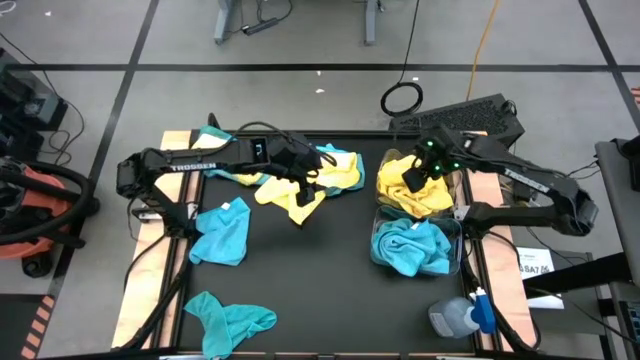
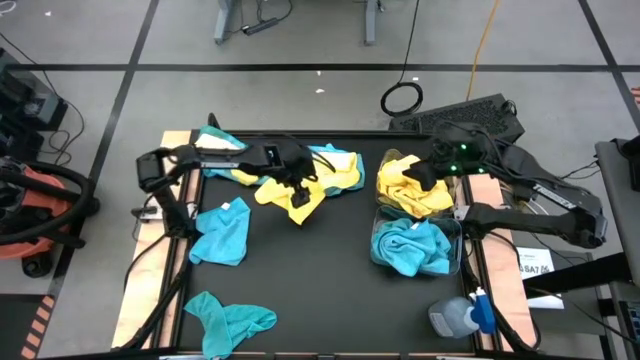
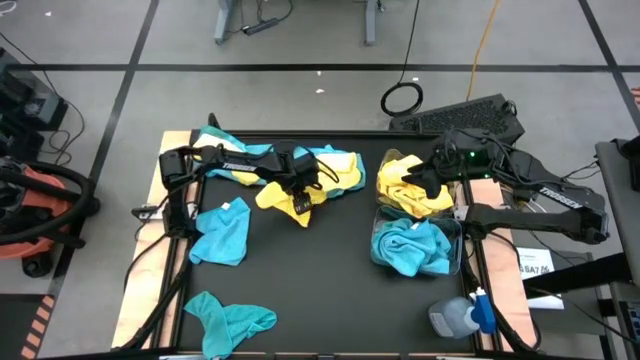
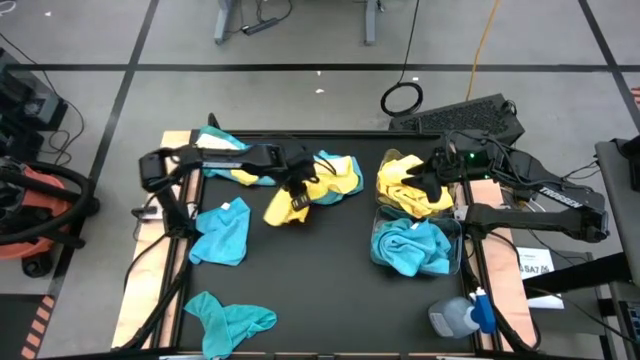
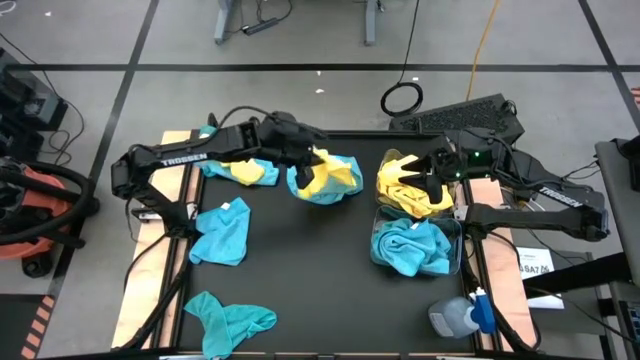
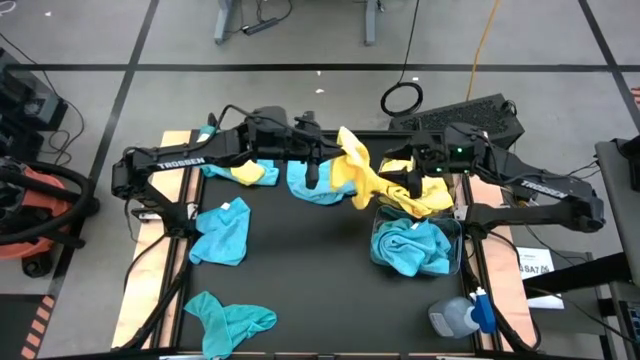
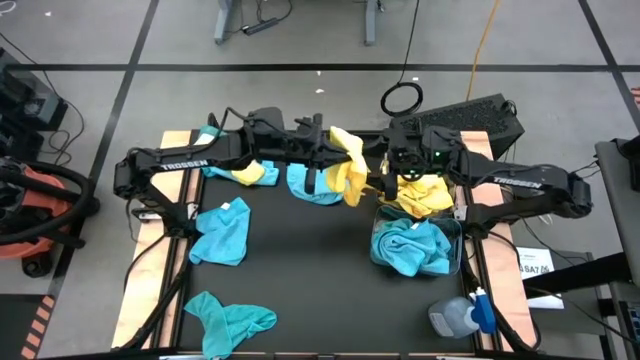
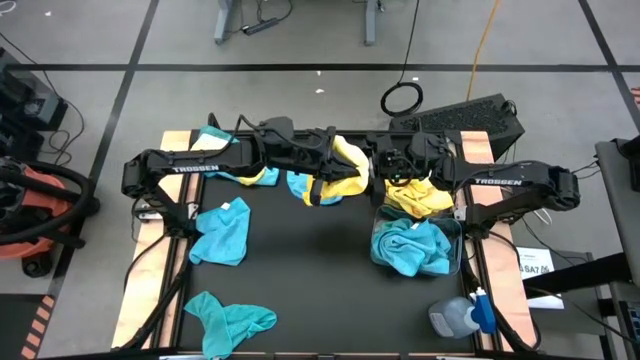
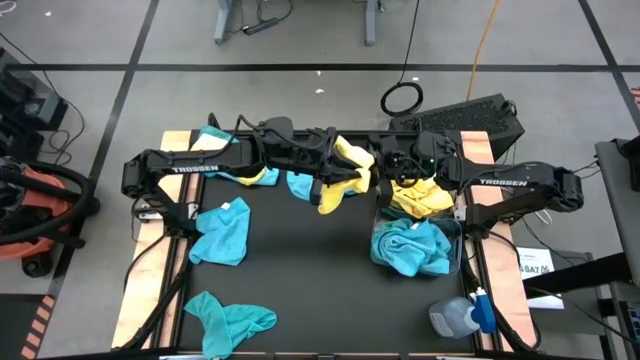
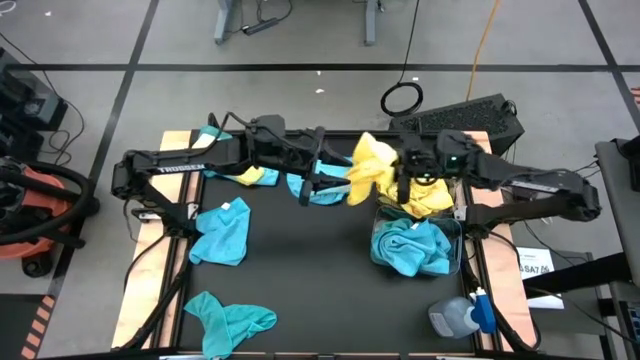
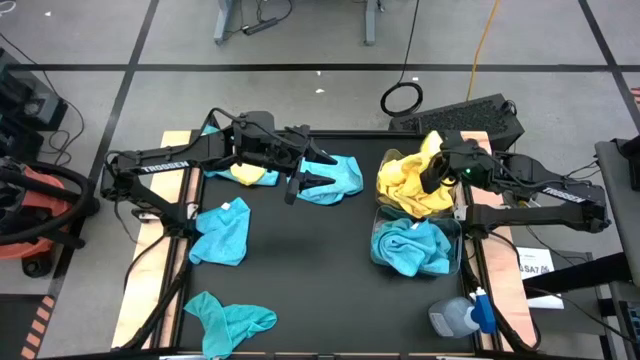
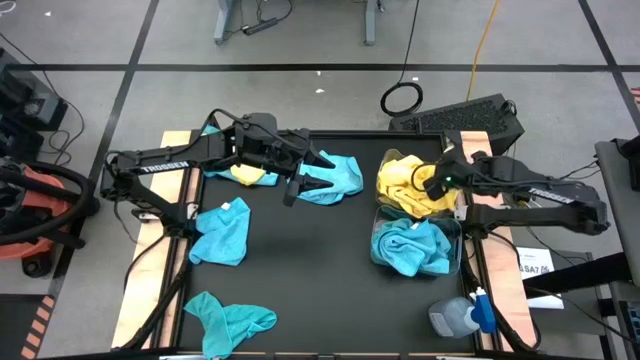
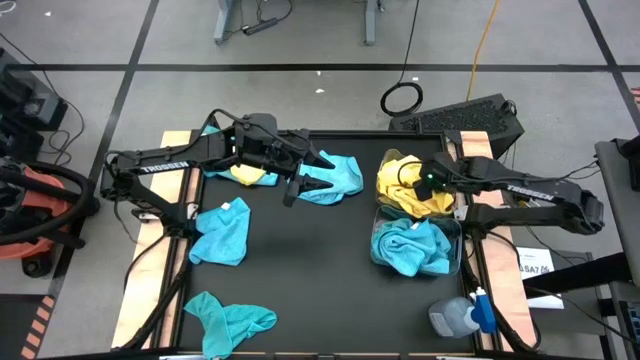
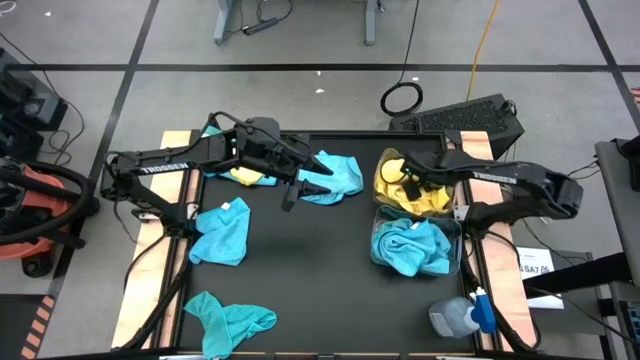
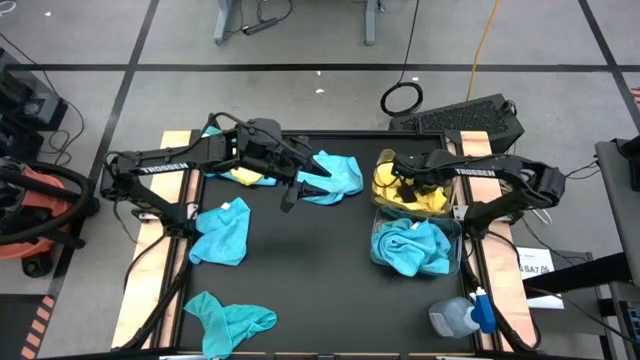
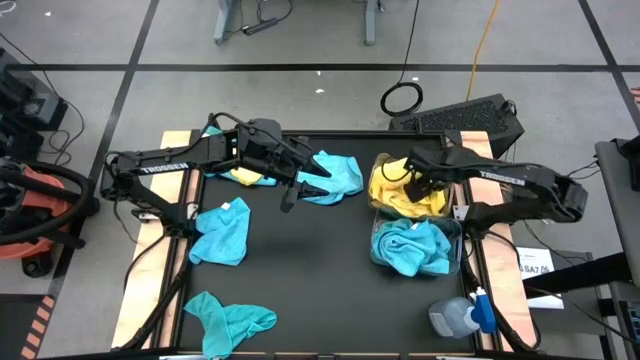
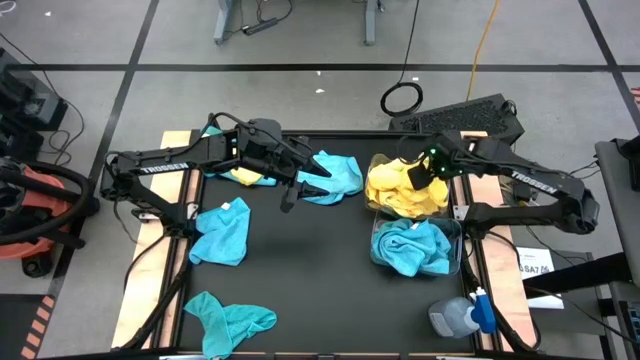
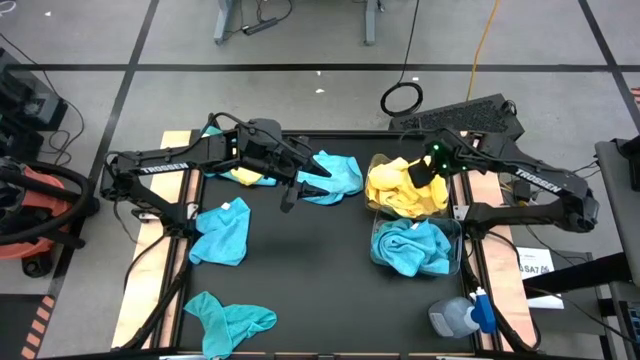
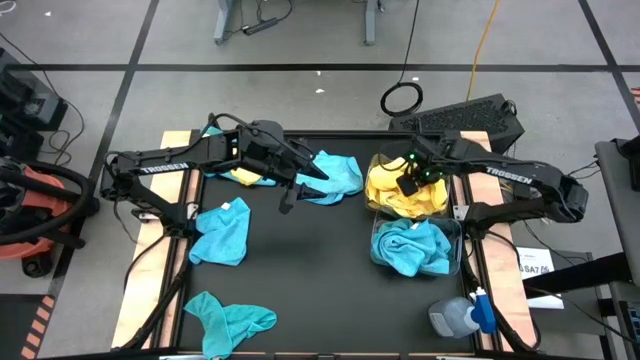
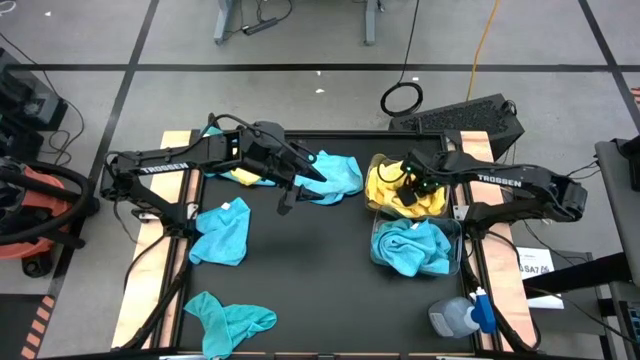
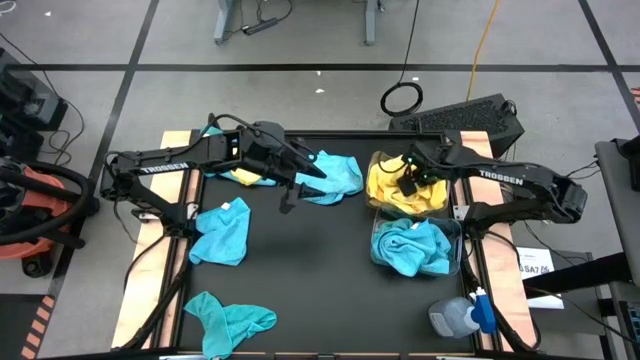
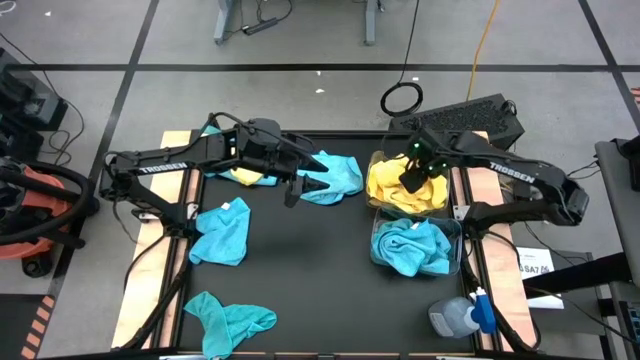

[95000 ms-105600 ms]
Task: Sort microfiber towel by color & place in baskets
Put the yellow microfiber cloth into the top transparent bin

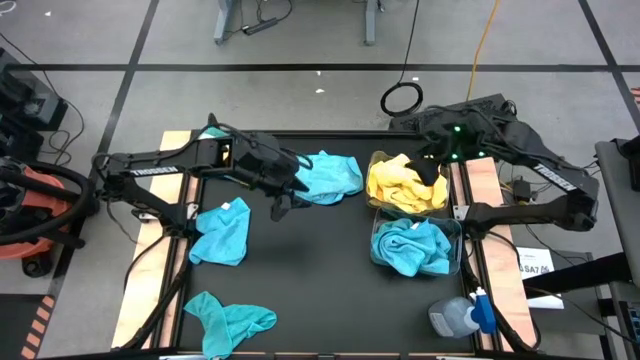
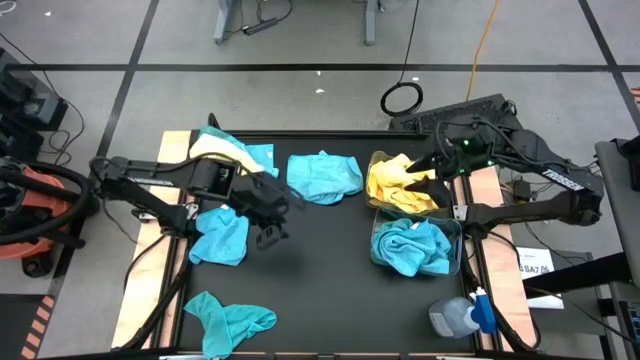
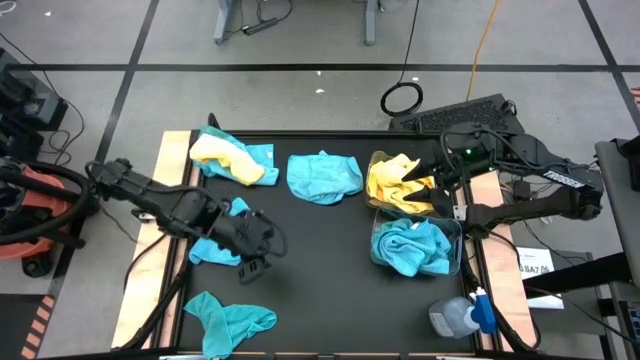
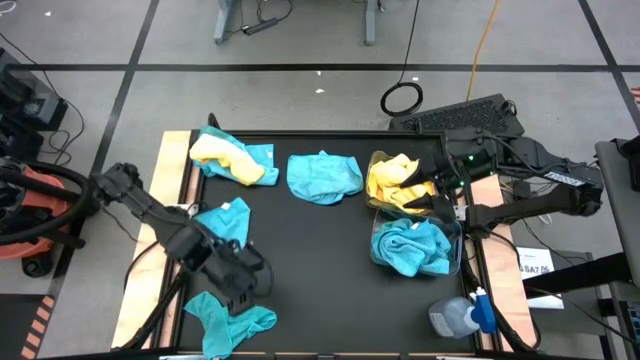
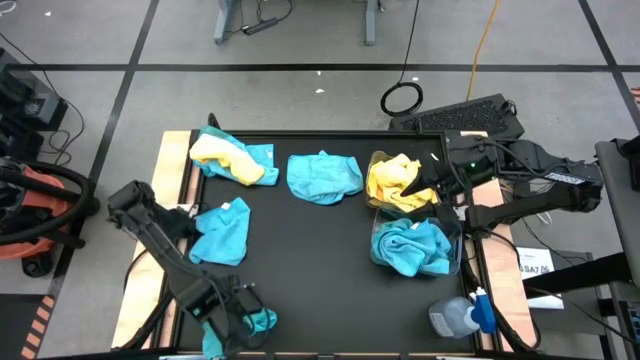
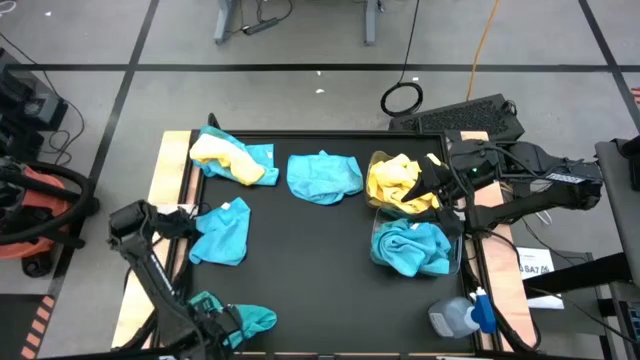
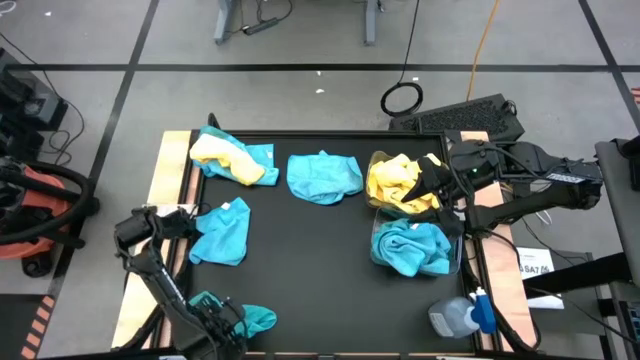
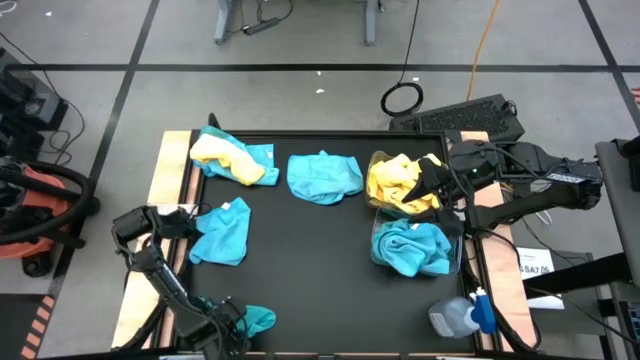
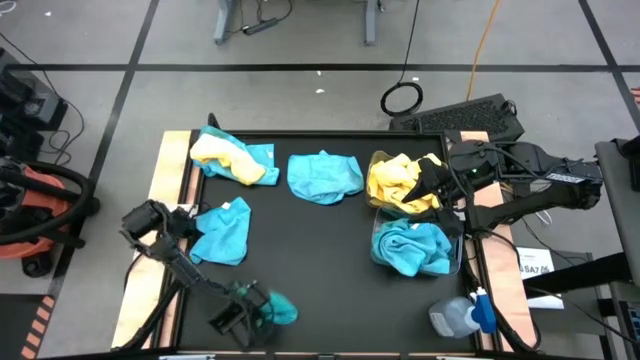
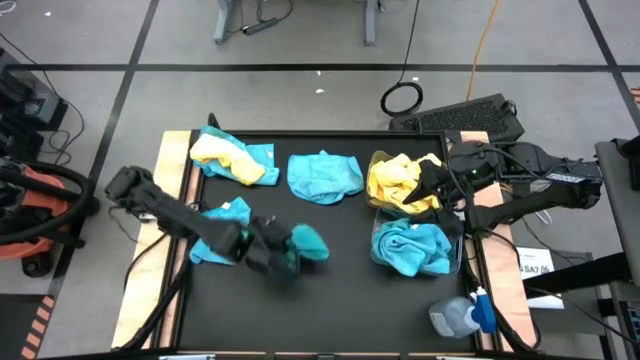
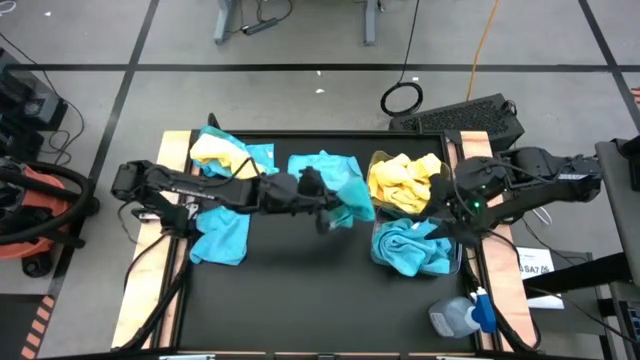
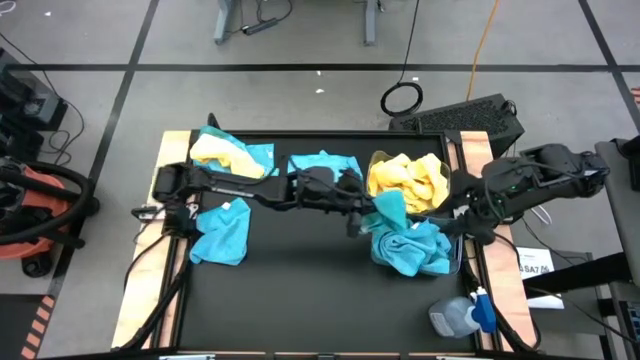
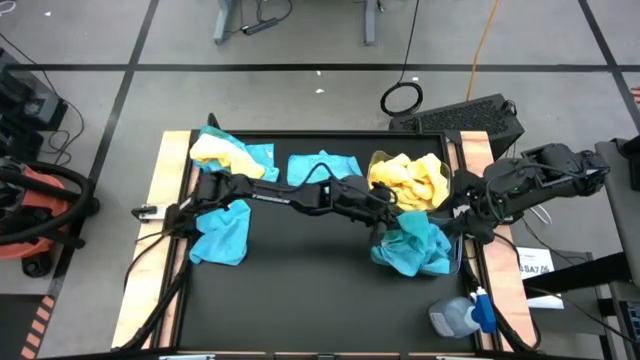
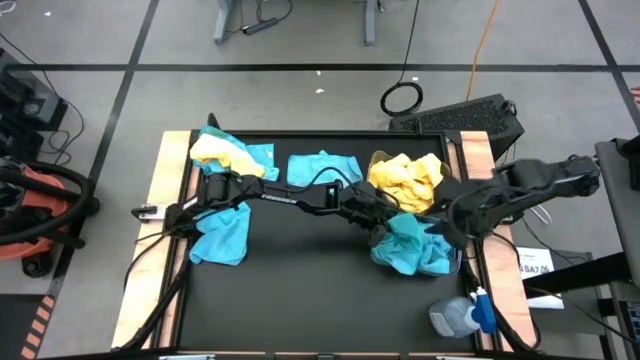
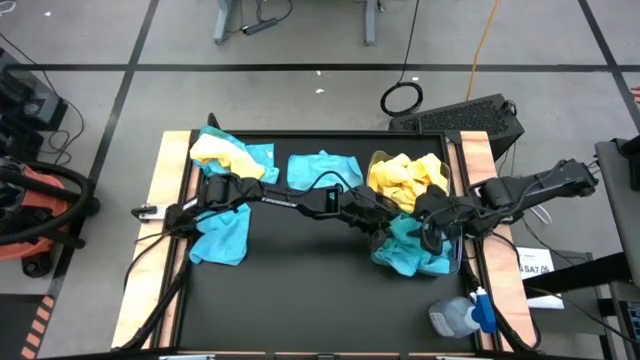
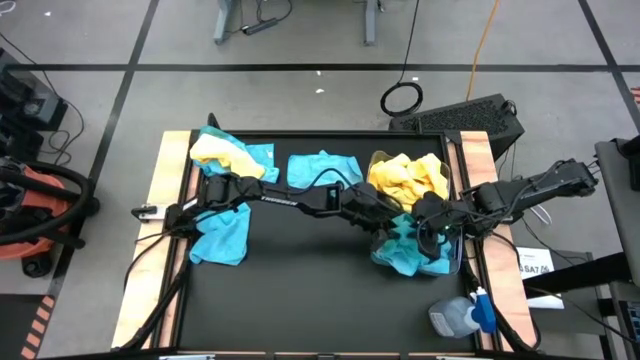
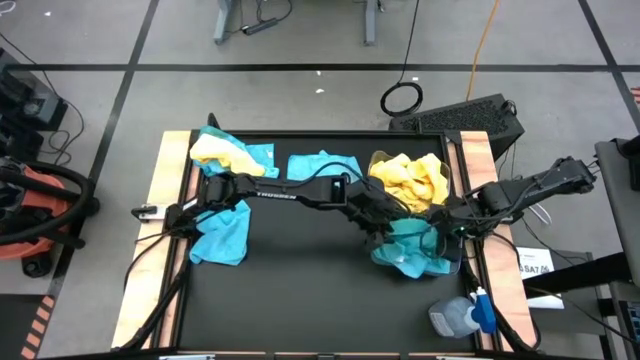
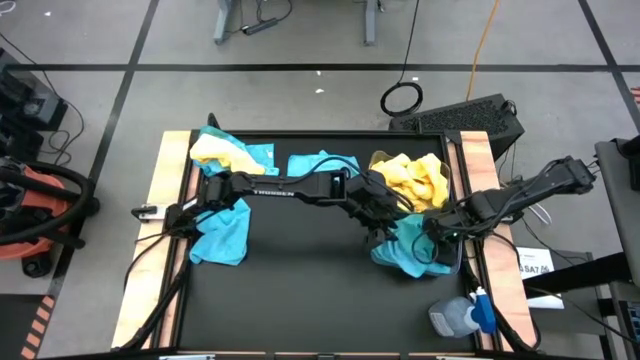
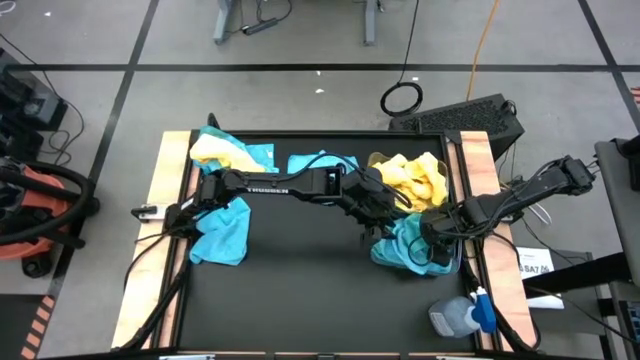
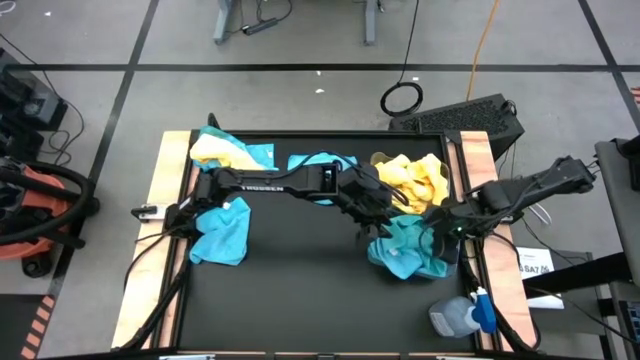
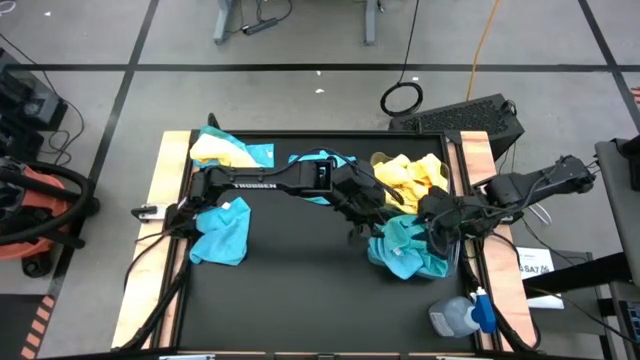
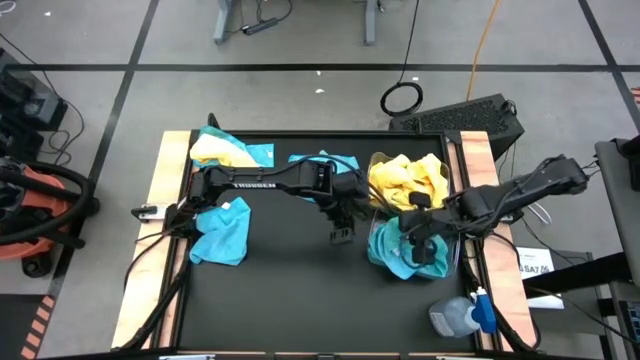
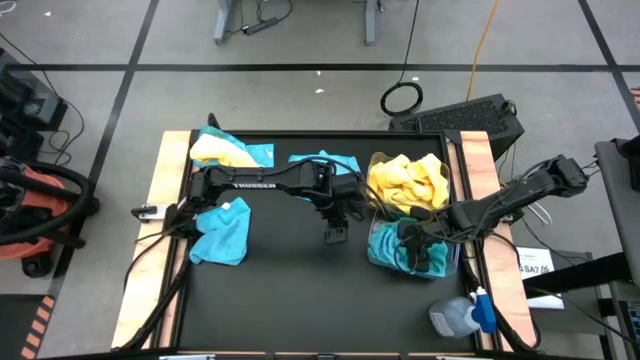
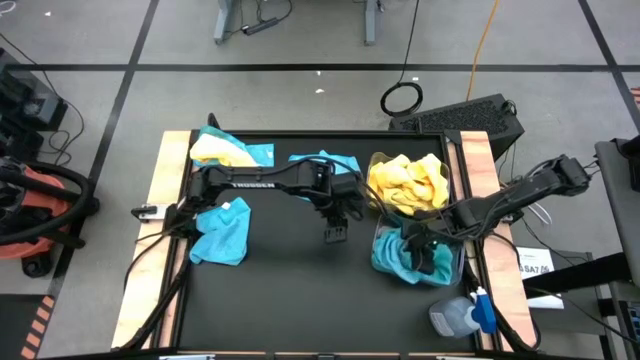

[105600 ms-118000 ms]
Put the blue microfiber cloth into the bottom transparent bin
